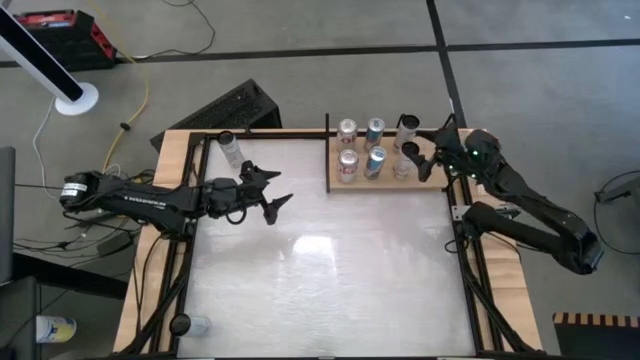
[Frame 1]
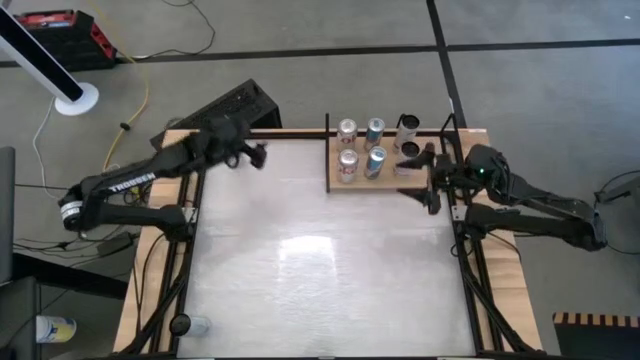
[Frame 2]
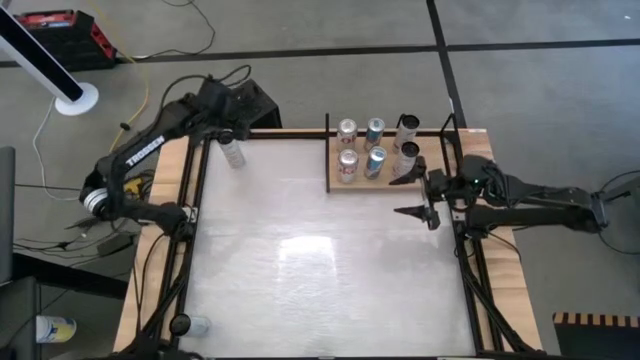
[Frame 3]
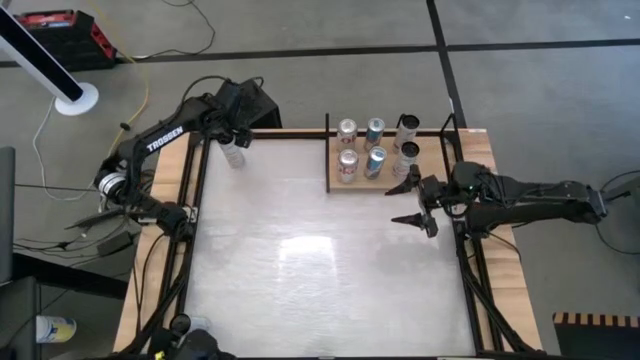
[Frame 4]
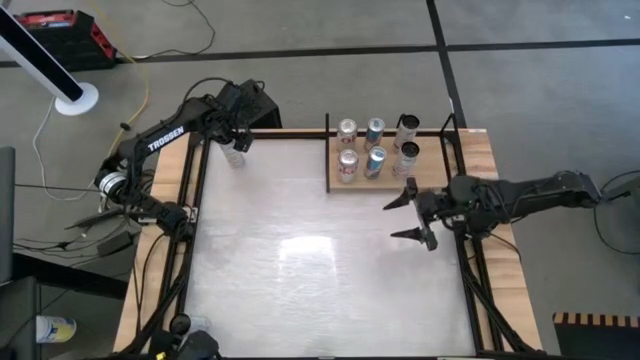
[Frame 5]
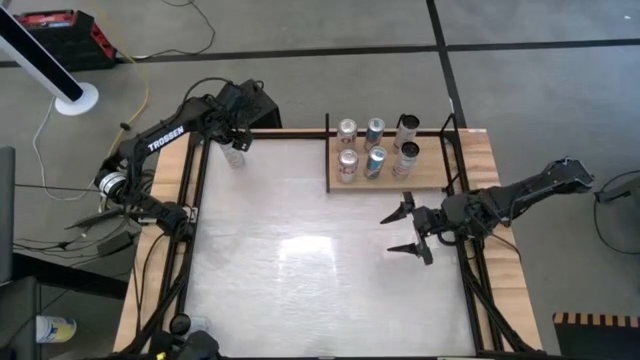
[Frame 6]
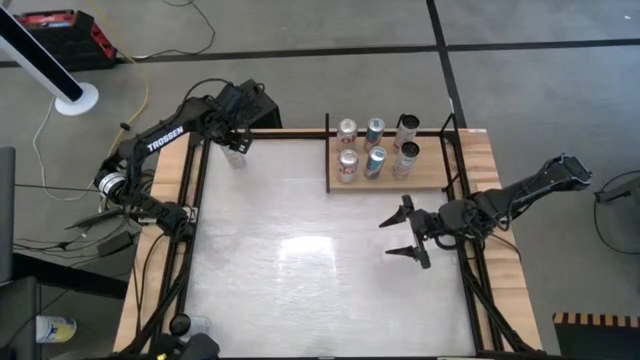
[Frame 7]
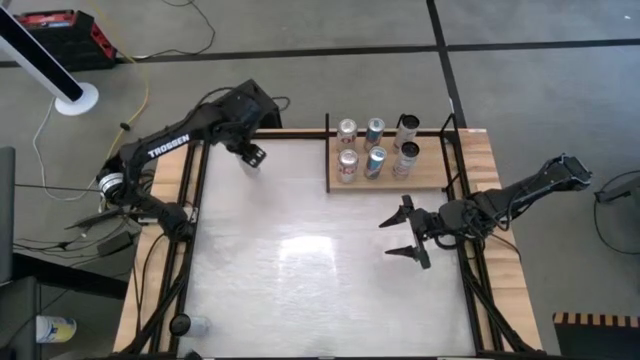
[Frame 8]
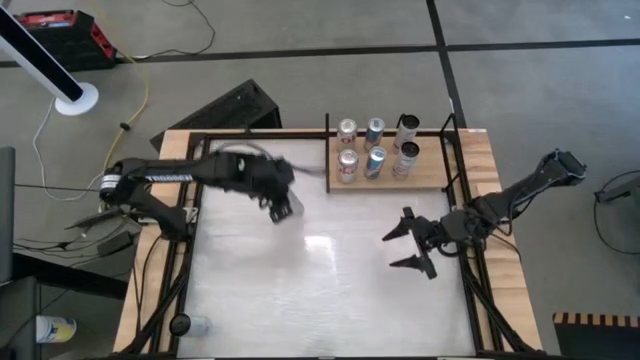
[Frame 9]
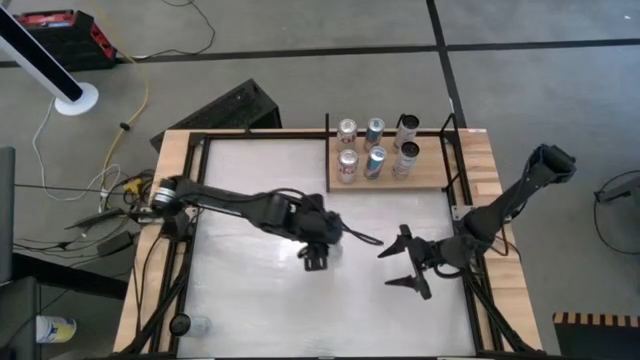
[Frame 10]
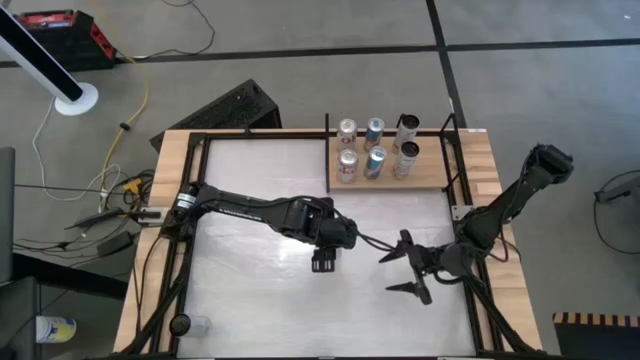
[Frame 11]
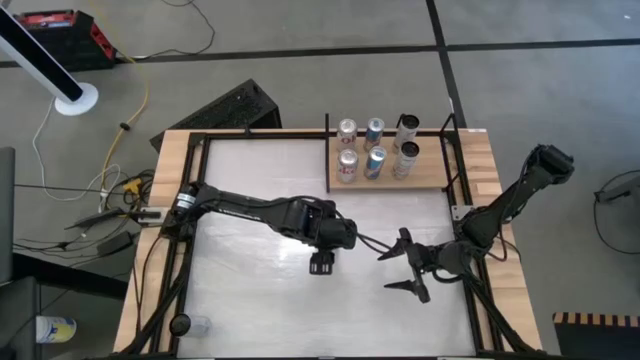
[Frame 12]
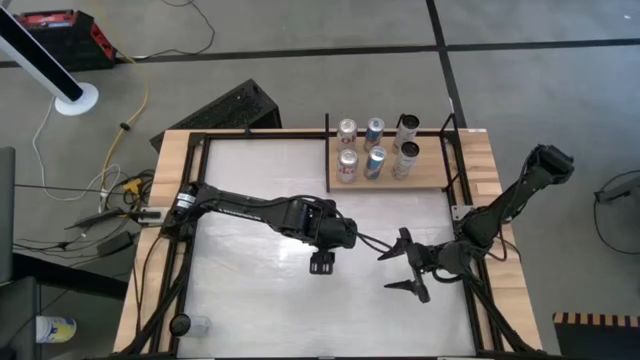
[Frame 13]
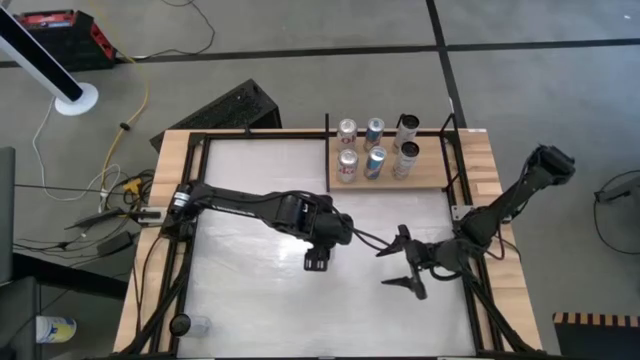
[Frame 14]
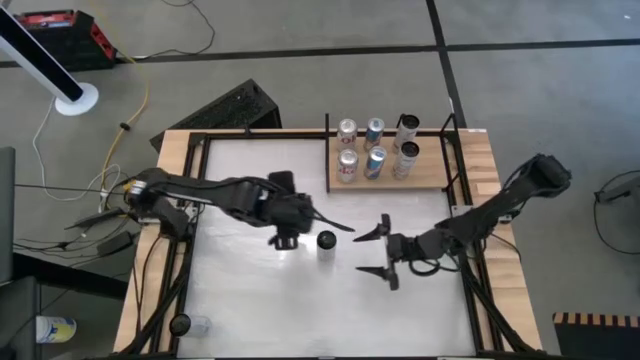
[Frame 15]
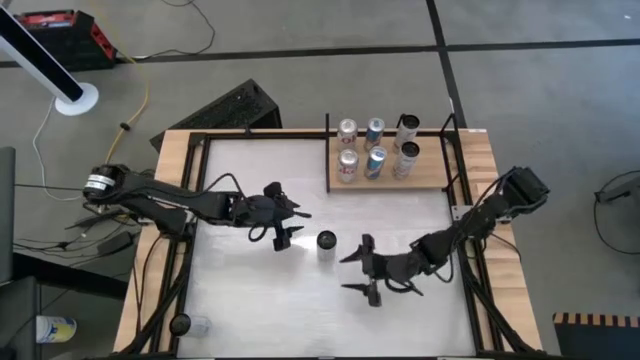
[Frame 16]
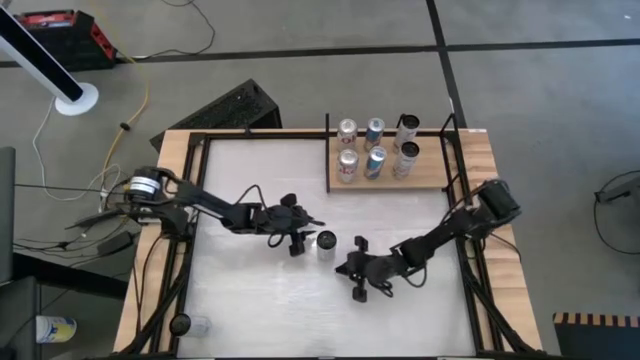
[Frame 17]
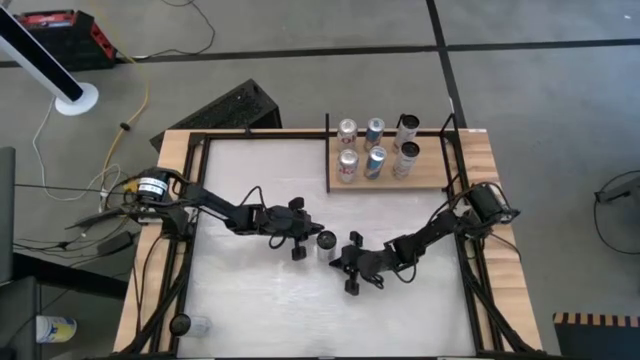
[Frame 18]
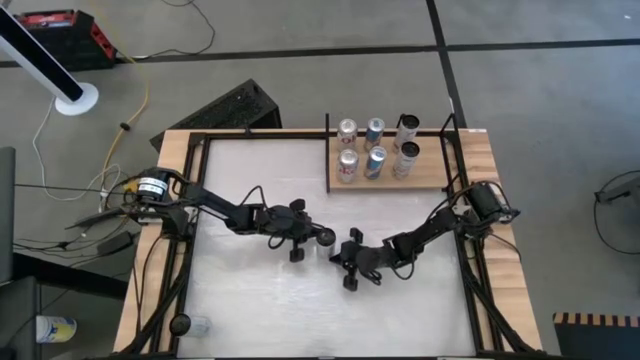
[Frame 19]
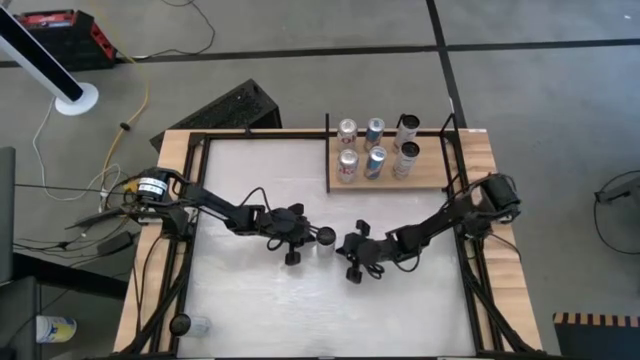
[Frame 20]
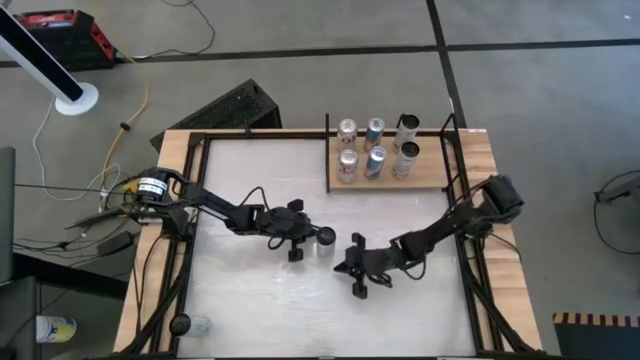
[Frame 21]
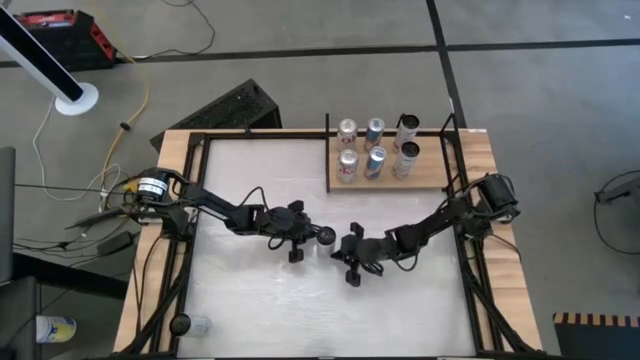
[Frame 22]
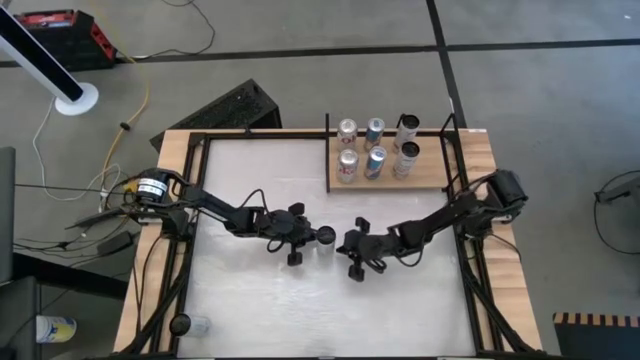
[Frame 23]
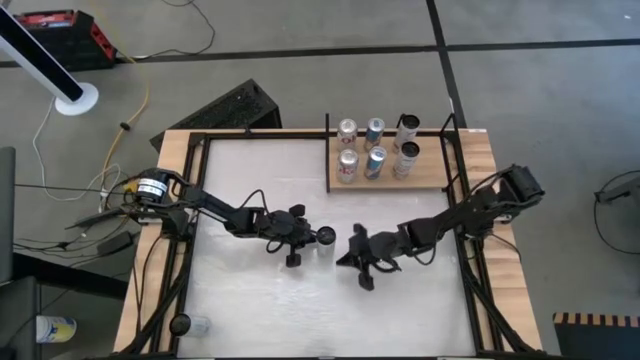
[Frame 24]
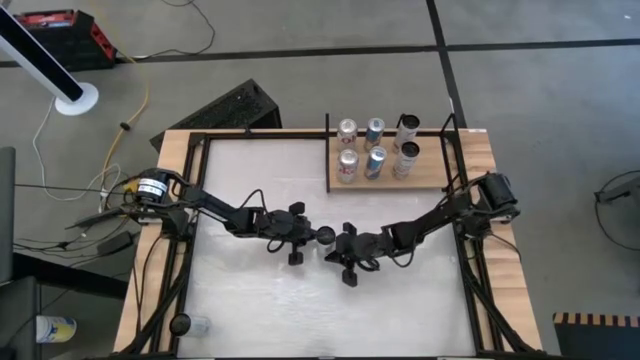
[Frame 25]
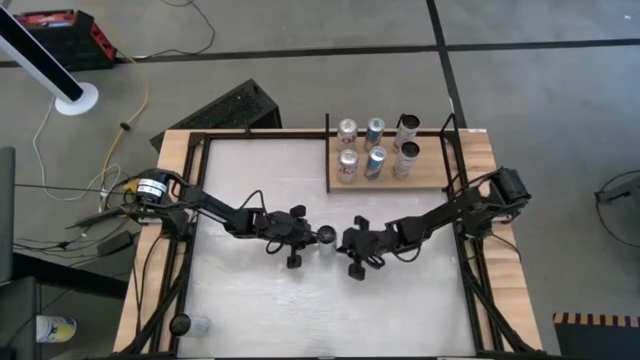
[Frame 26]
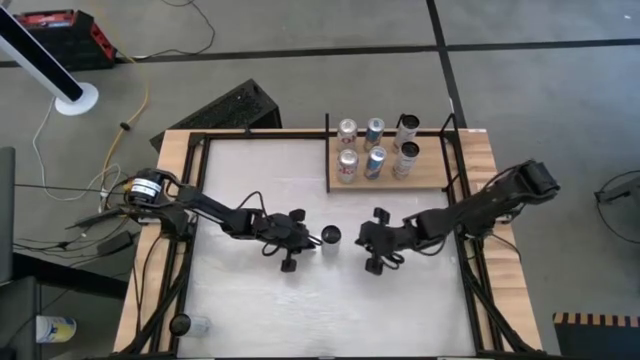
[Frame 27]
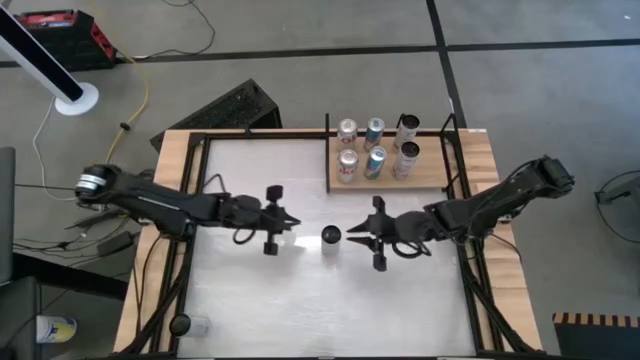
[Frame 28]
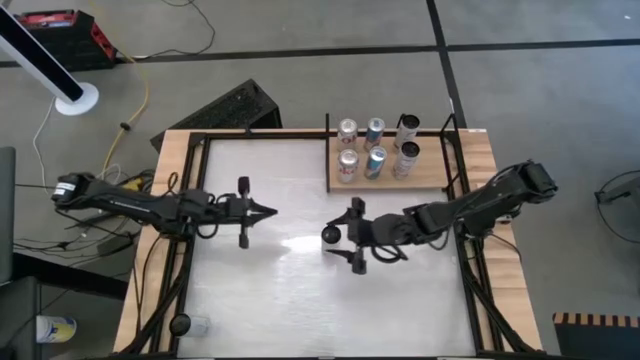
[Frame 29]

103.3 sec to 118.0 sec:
Task: Place canned beverage on shelf
Put the top white-yellow soda can on the shelf

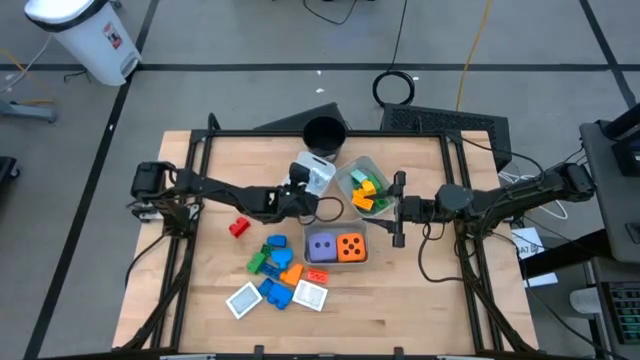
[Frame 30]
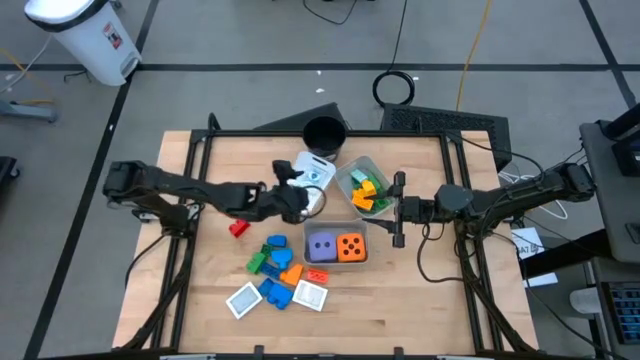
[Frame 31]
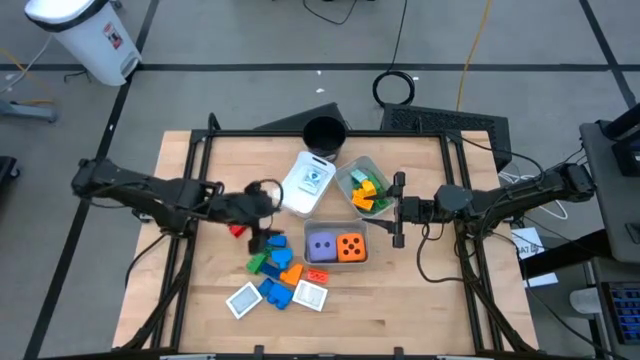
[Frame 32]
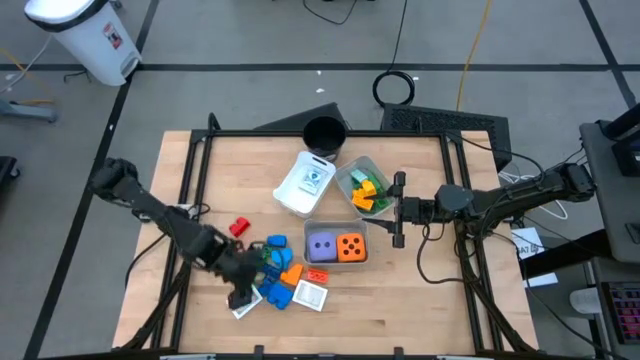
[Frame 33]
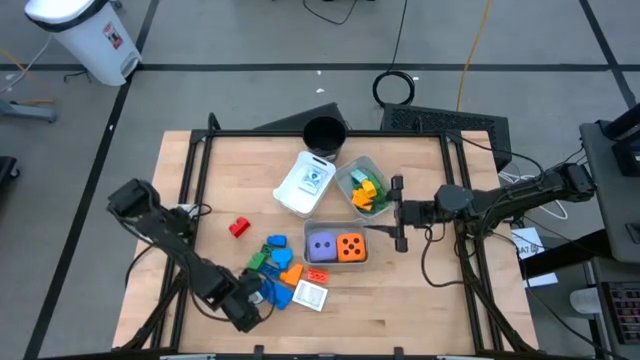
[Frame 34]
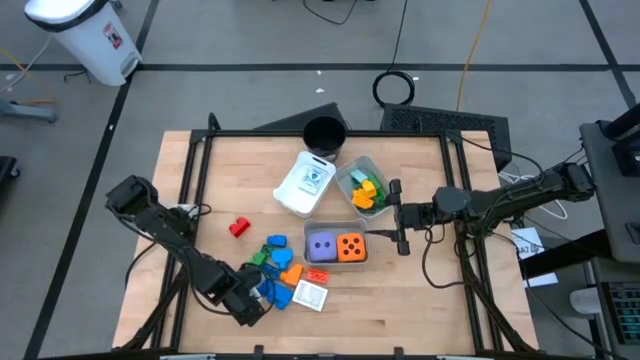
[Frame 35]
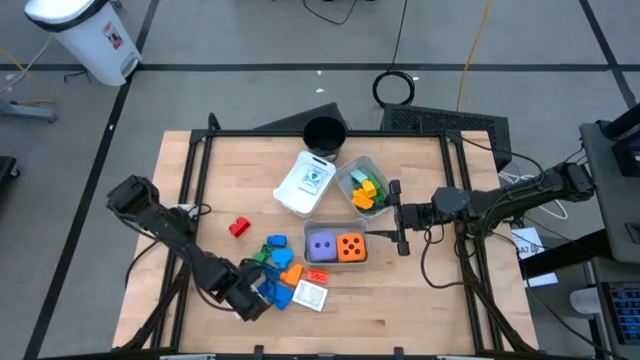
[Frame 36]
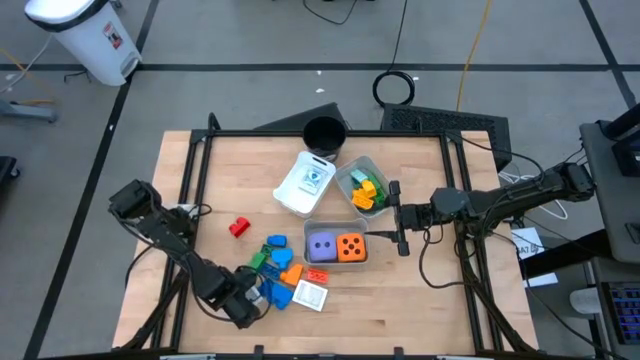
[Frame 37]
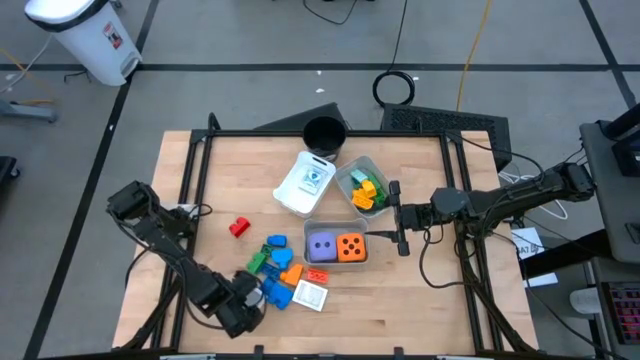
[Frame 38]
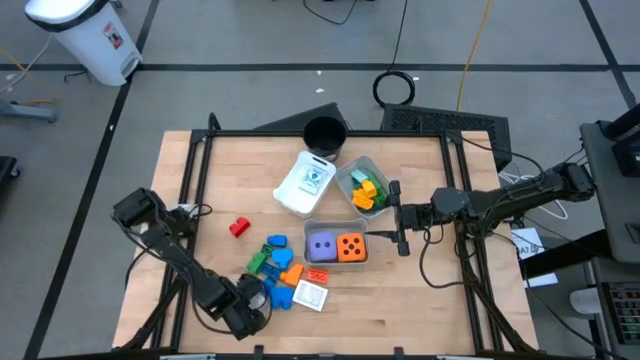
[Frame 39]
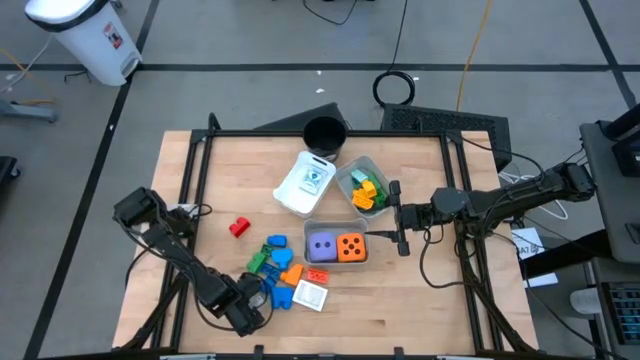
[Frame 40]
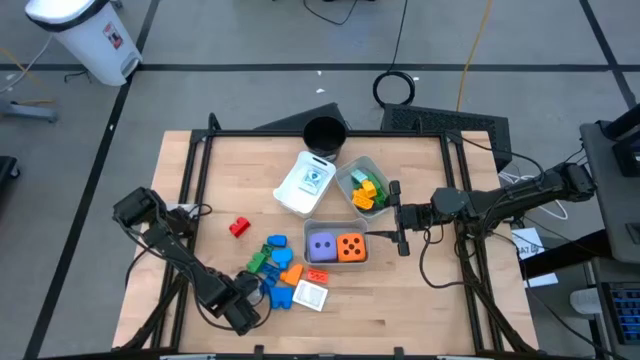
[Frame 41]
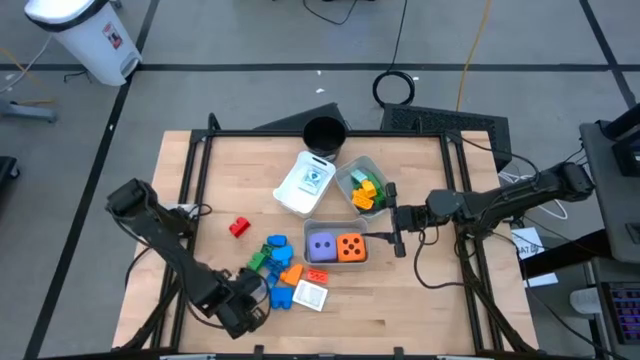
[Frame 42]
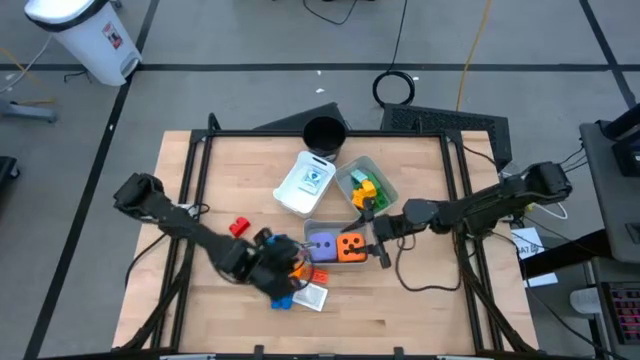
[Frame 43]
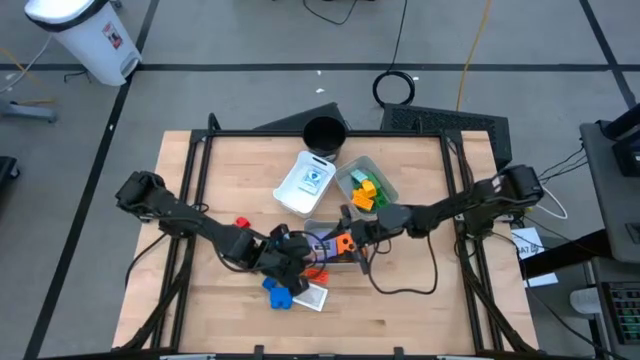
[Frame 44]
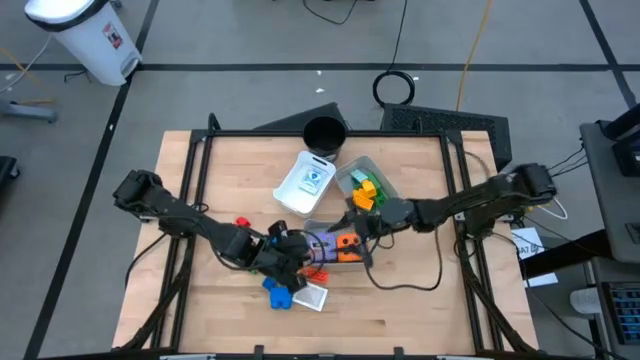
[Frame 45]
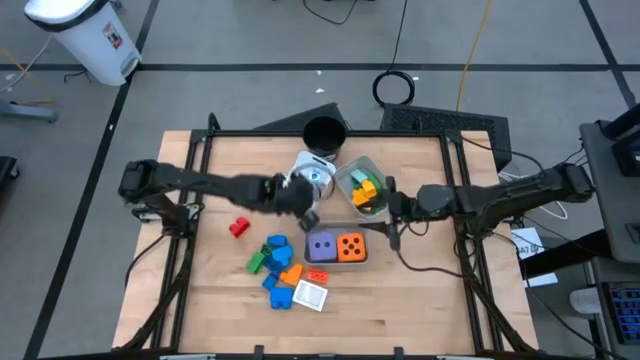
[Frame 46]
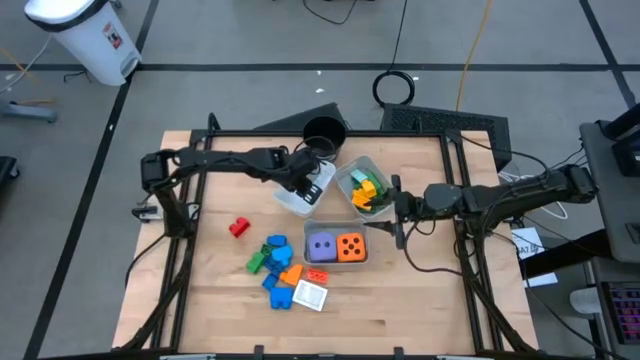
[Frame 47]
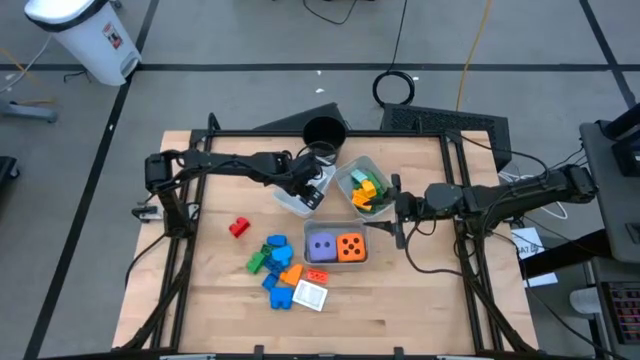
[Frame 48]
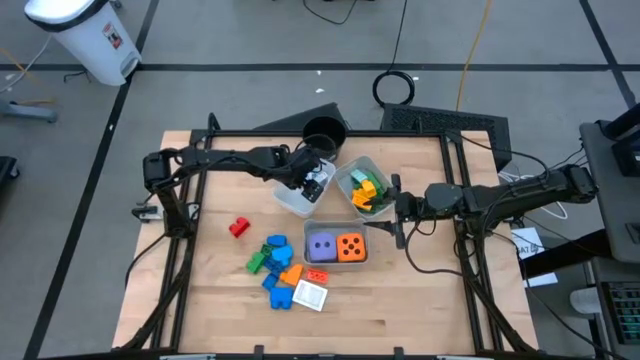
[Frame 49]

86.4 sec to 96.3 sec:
Task: Pick & Place Toys
Put the gray deck of cards into the white bin
